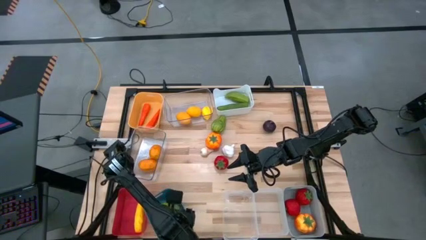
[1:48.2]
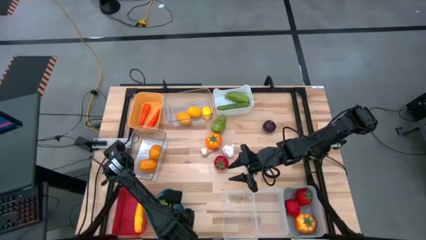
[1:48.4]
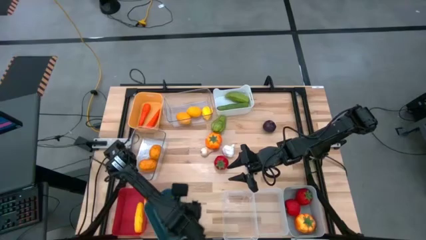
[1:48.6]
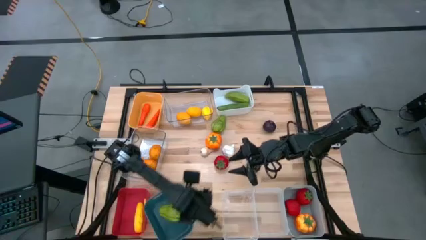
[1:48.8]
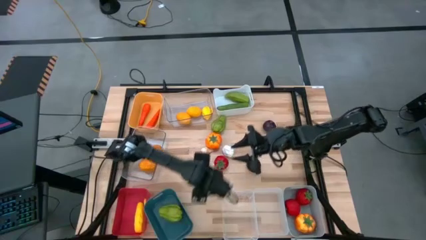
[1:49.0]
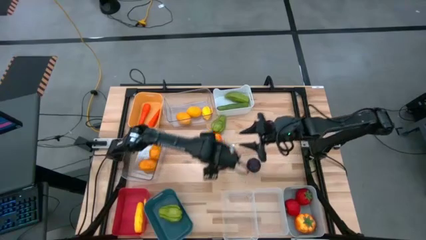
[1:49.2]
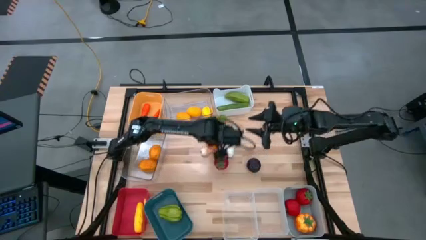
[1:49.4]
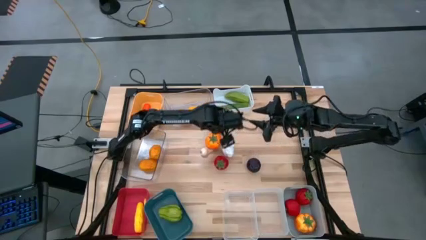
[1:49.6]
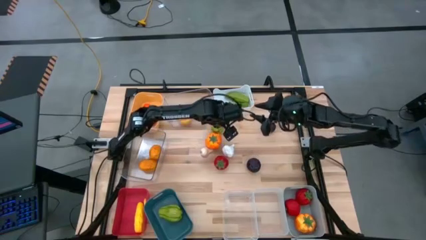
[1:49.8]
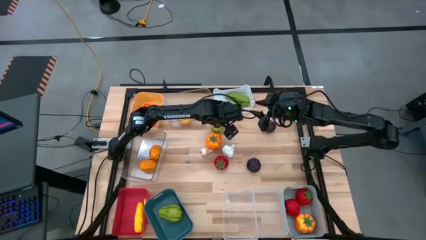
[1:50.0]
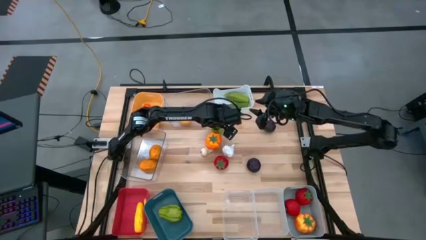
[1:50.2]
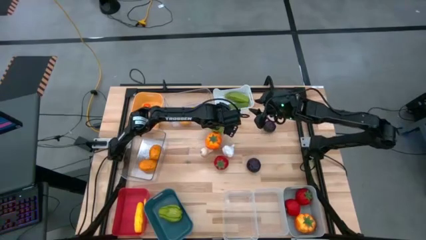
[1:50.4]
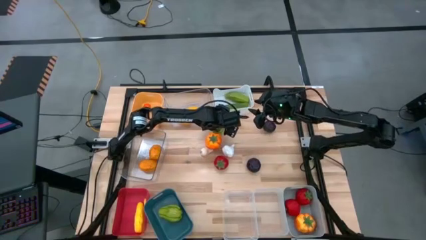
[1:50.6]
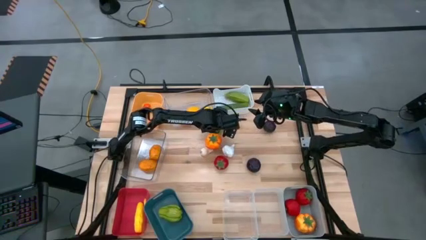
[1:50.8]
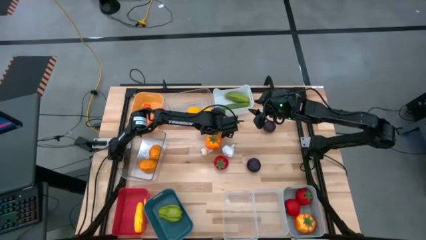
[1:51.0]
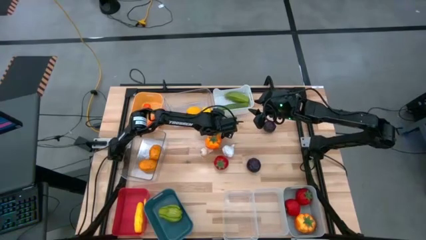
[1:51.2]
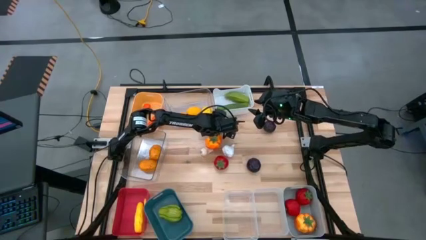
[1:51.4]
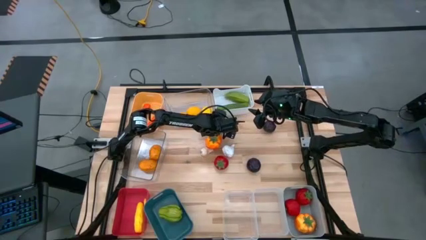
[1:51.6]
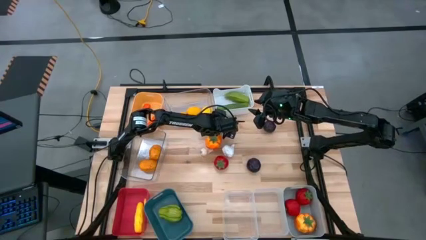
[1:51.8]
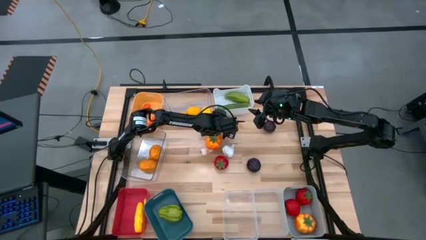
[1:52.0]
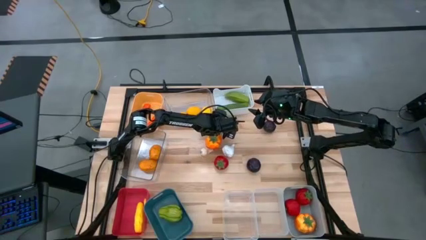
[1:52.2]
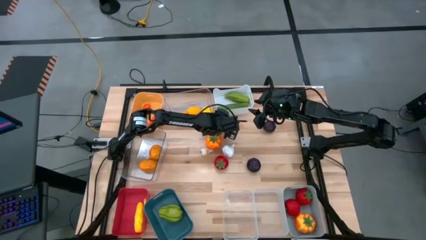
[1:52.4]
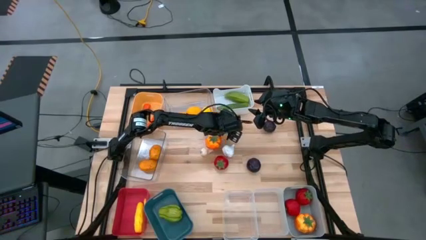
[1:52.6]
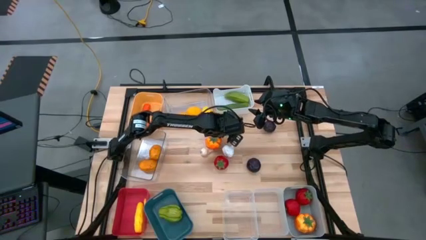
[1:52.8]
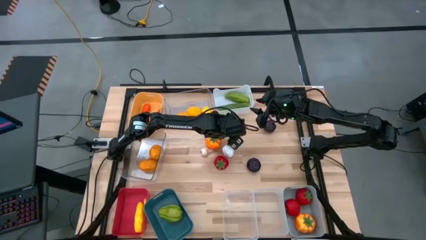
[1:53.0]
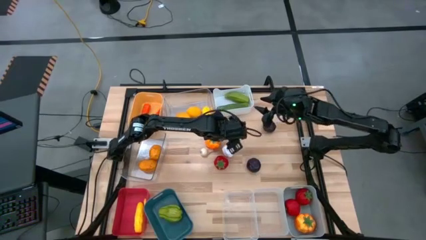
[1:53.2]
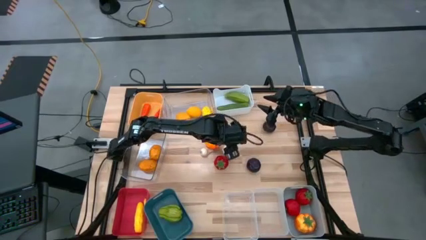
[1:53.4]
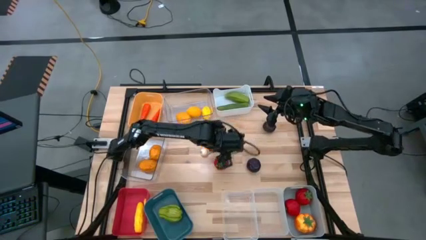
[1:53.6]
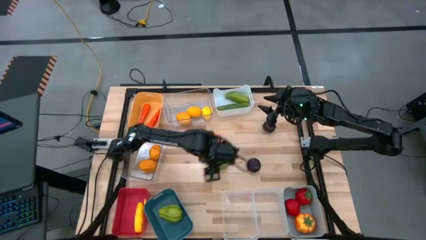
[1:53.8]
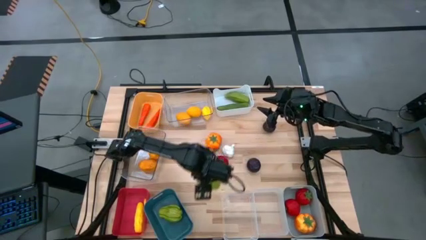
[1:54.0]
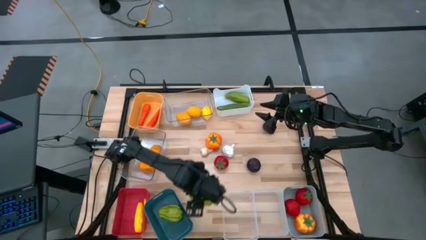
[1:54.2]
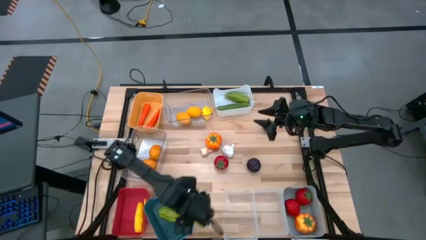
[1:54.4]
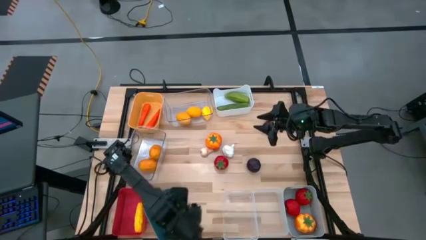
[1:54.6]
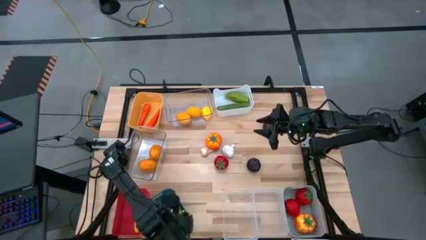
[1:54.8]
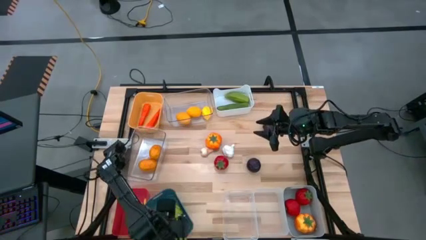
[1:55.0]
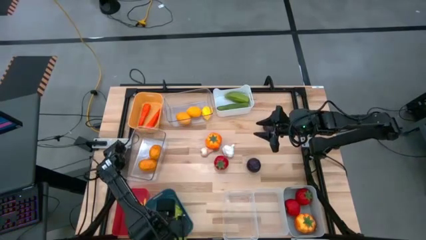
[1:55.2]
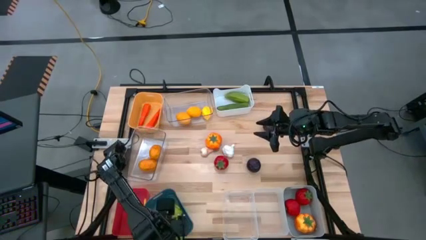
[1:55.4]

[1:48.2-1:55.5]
Task: Sort produce into baskets
Put the green chayote into the blue bin

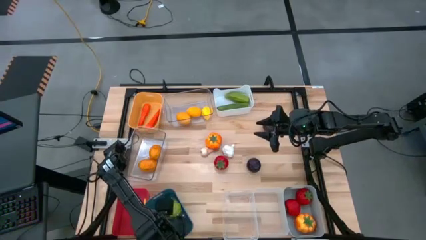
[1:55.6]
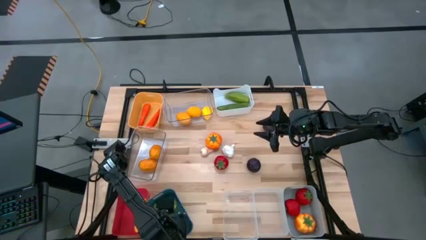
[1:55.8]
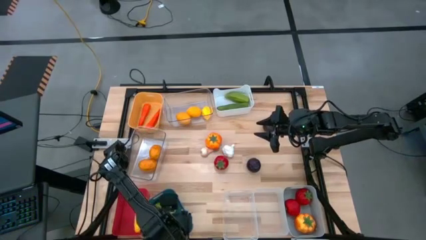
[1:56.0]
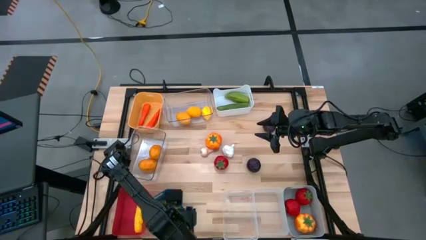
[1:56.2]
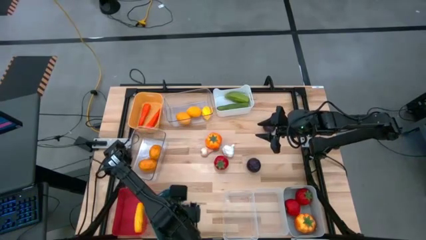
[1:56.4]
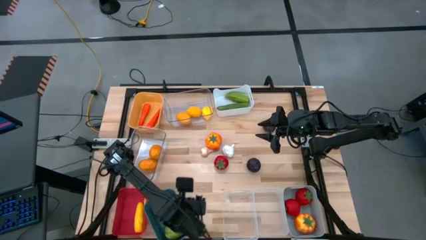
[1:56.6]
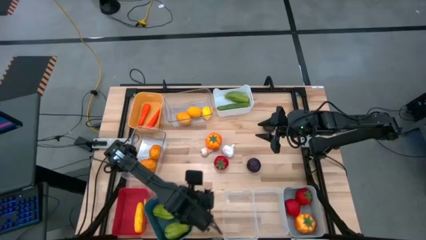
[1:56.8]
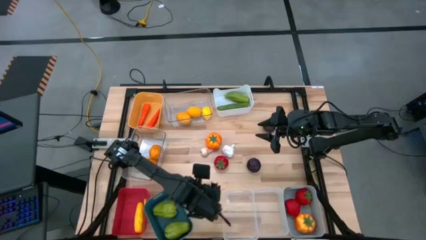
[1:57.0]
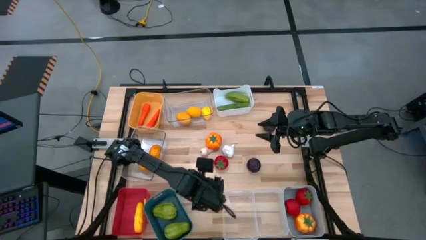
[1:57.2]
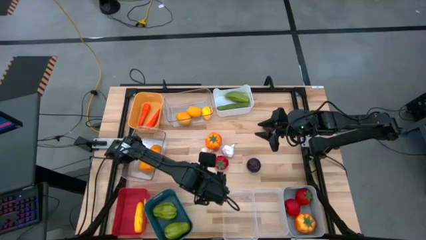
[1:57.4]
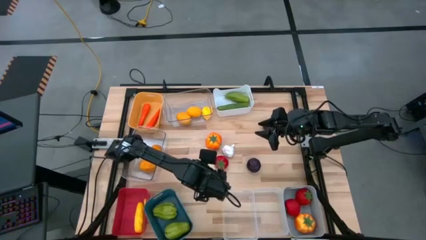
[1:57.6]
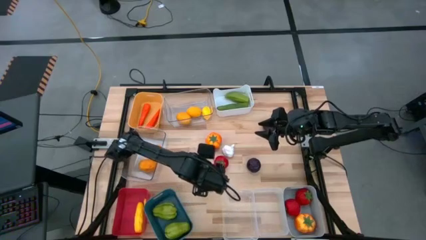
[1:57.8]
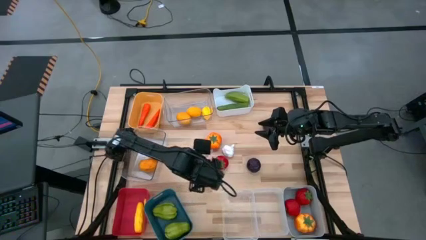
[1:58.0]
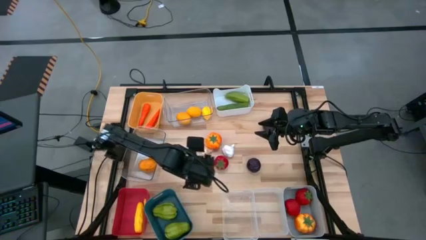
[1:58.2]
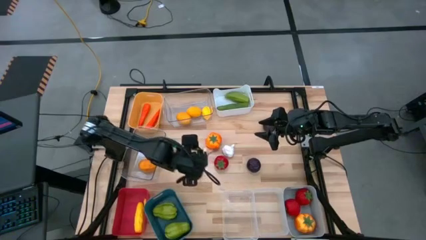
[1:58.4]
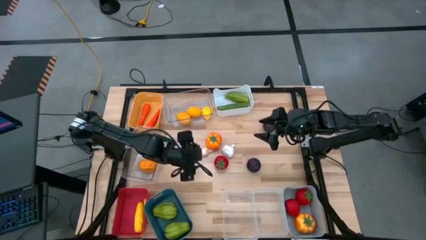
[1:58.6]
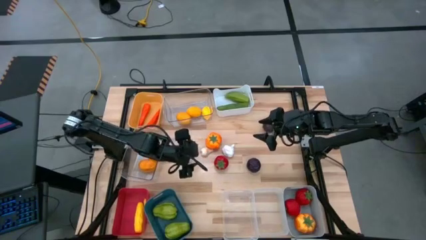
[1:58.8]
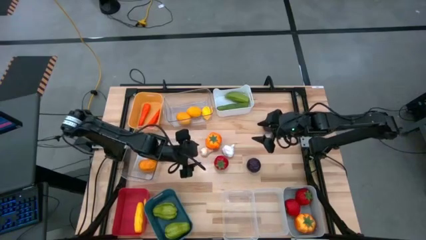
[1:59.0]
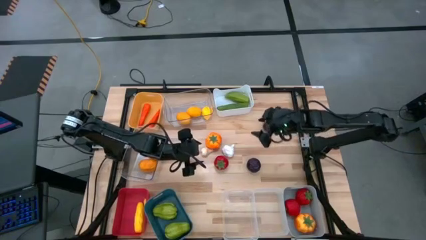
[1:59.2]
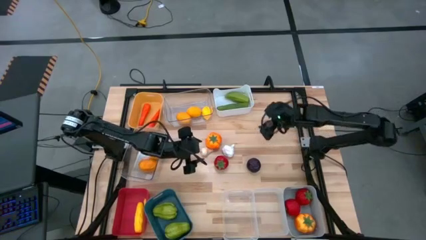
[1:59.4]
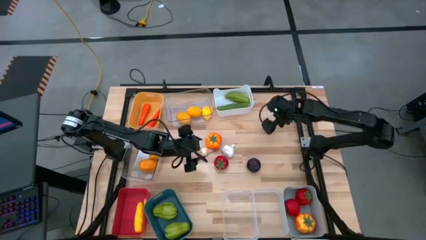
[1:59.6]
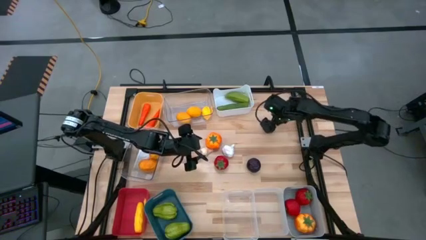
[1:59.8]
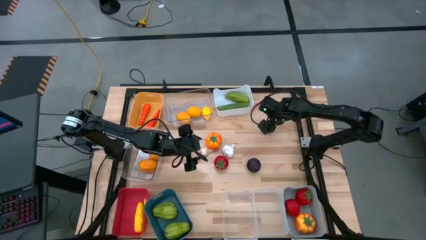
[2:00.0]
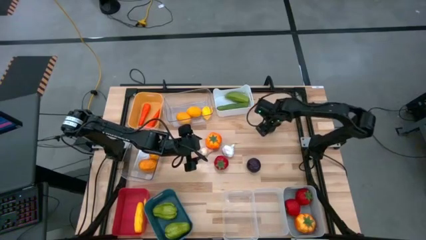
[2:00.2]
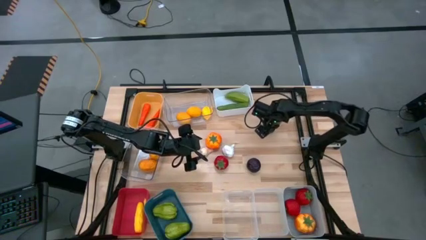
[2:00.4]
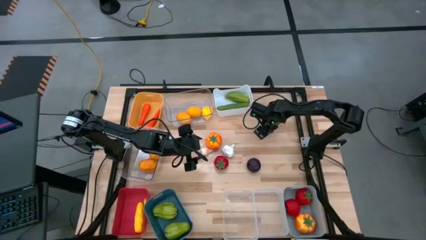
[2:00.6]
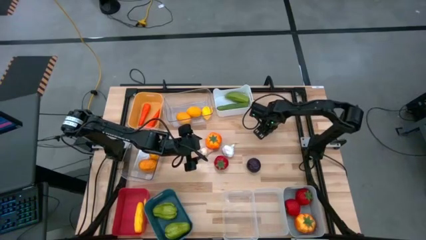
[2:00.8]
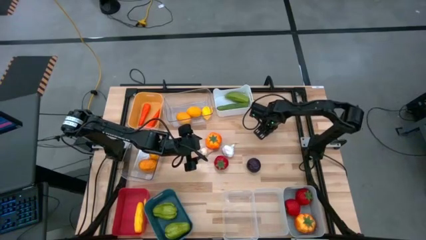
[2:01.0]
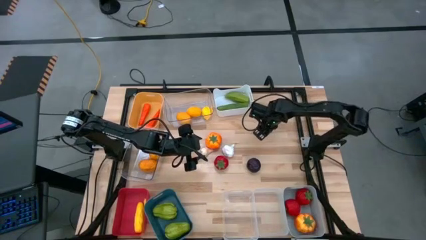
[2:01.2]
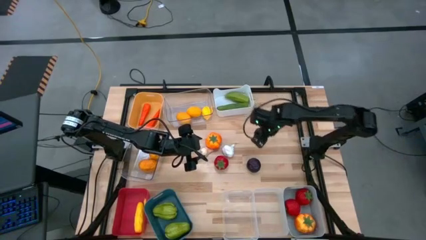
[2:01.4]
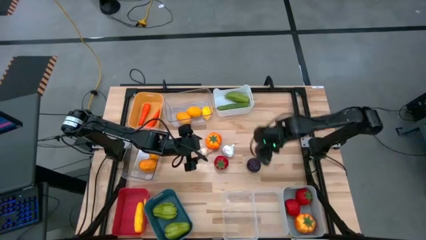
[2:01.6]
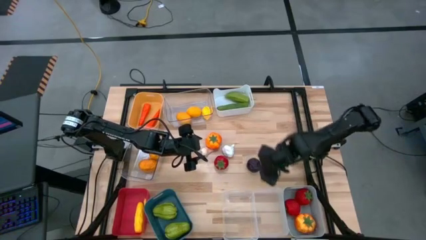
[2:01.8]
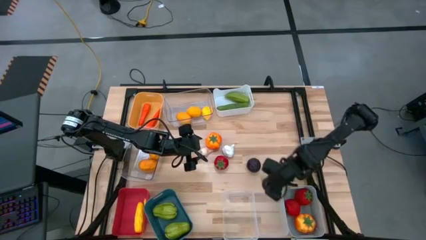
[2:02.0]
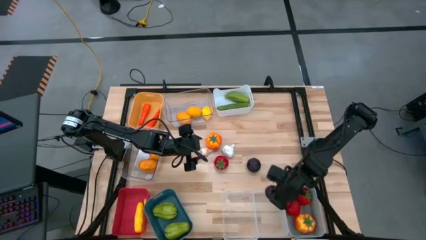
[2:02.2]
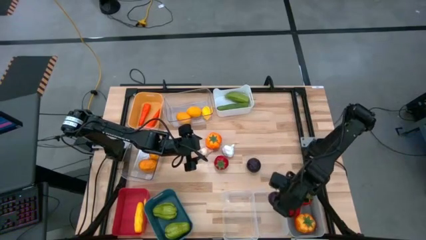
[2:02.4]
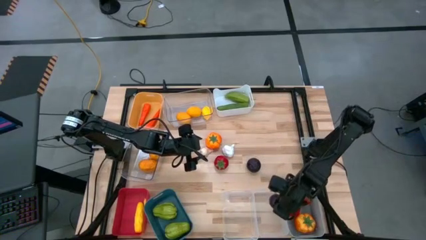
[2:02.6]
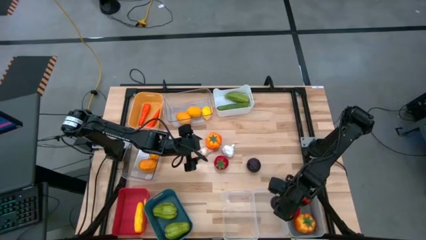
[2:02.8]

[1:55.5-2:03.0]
Put the top purple avocado into the bottom right transparent bin
